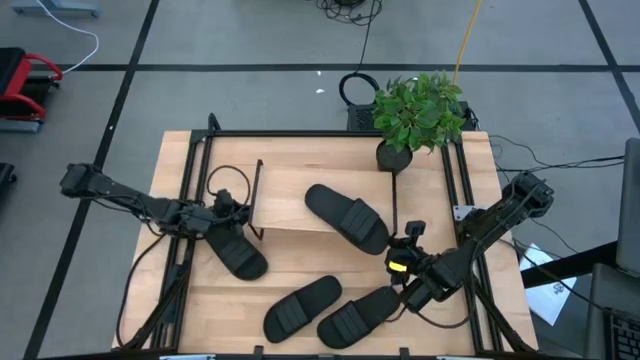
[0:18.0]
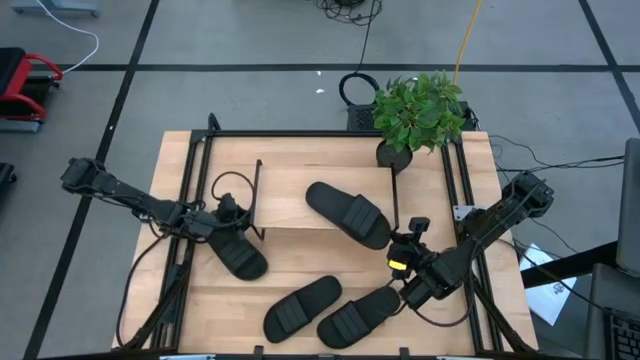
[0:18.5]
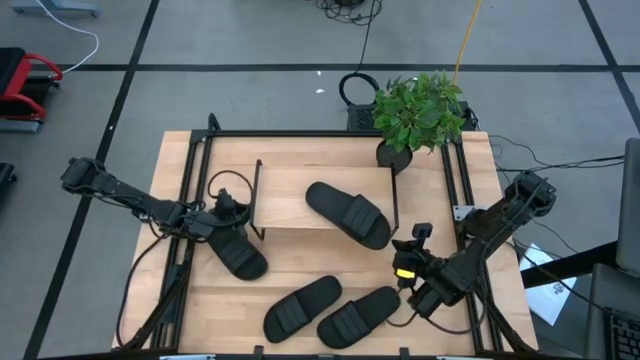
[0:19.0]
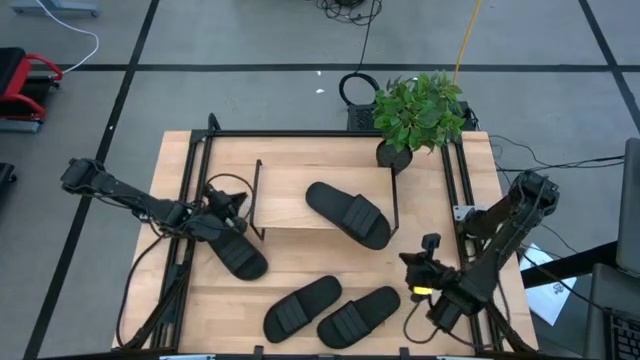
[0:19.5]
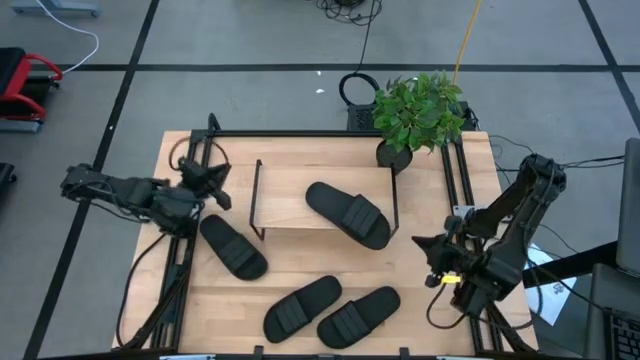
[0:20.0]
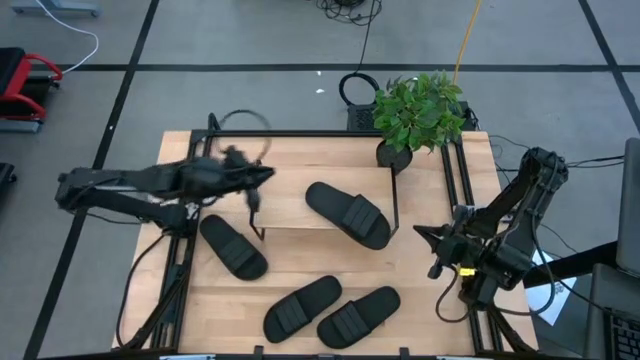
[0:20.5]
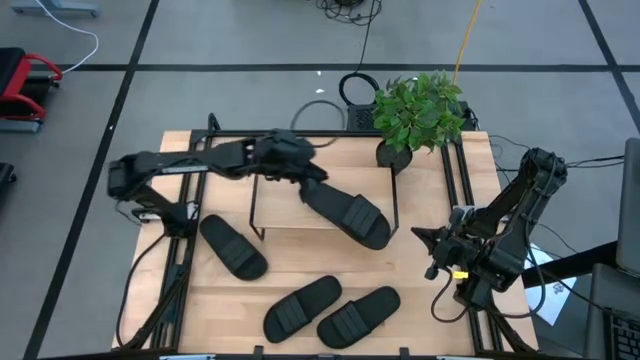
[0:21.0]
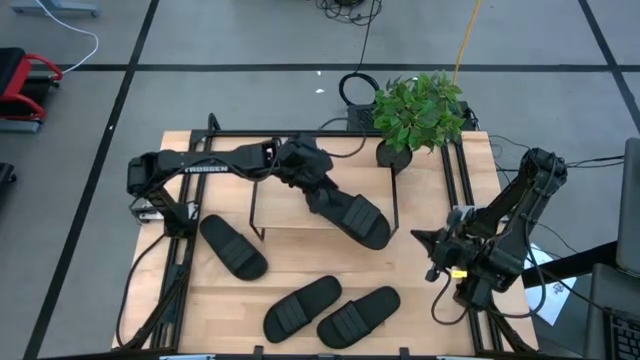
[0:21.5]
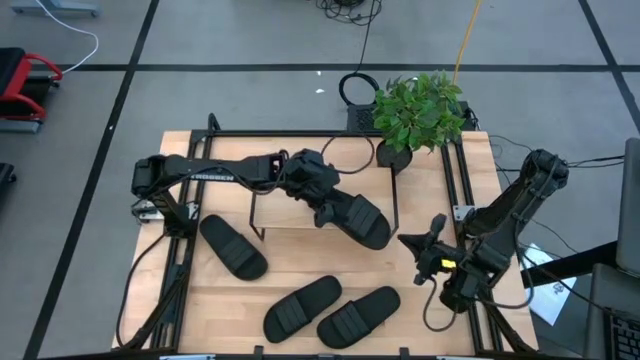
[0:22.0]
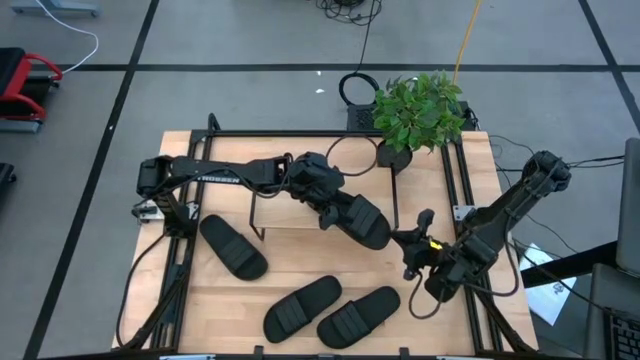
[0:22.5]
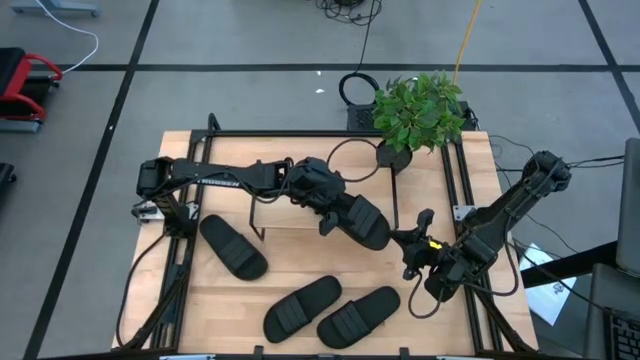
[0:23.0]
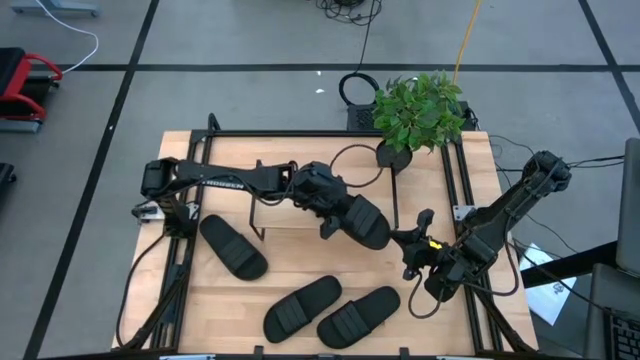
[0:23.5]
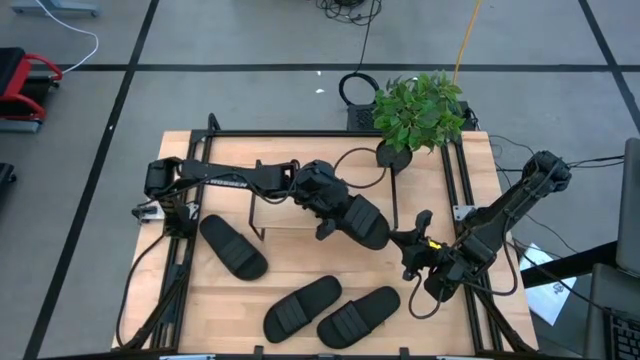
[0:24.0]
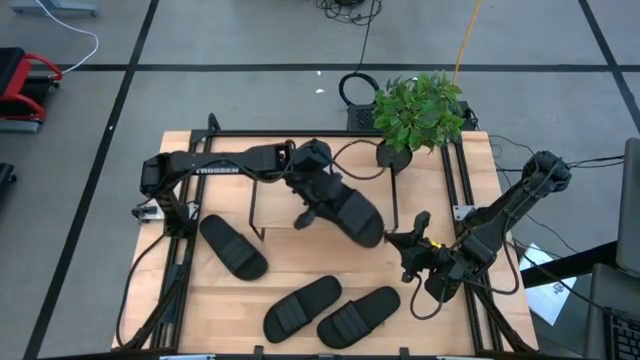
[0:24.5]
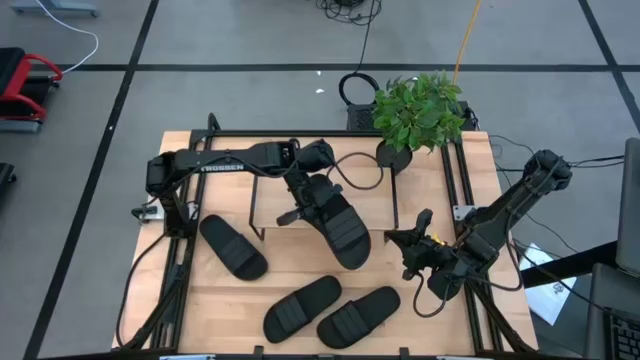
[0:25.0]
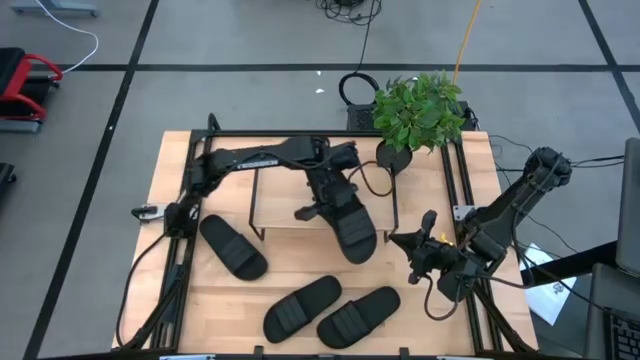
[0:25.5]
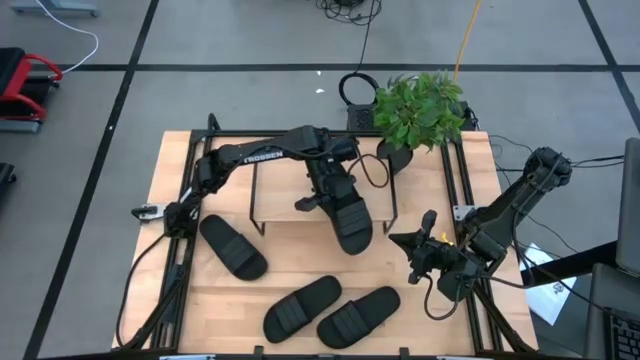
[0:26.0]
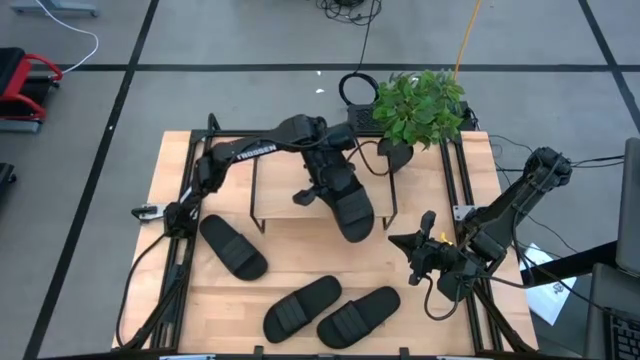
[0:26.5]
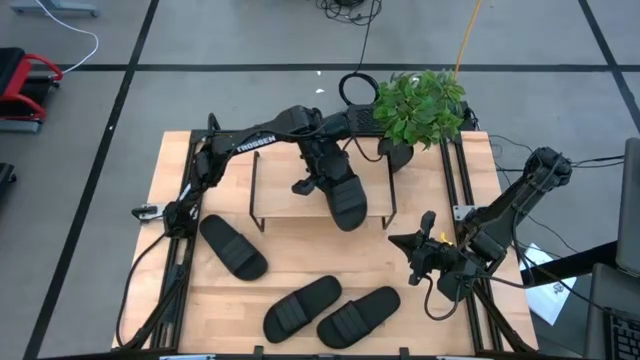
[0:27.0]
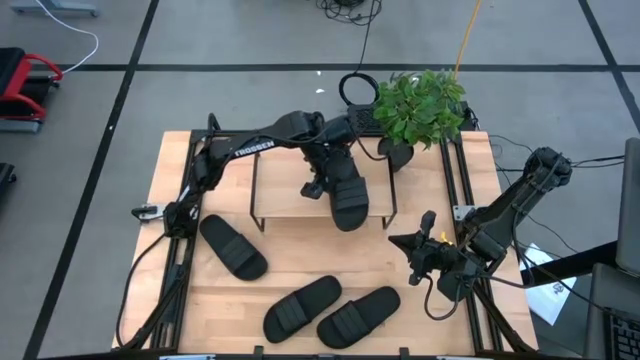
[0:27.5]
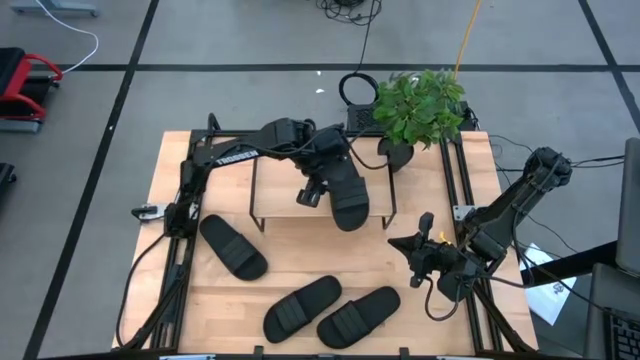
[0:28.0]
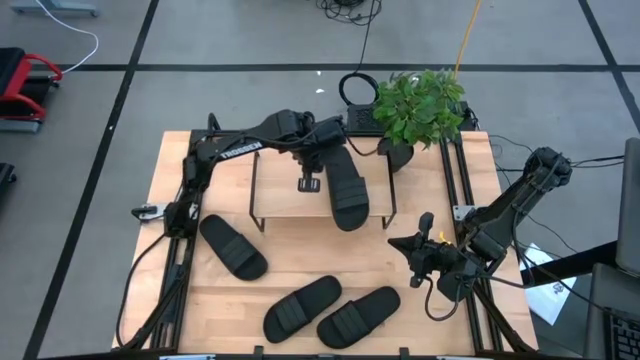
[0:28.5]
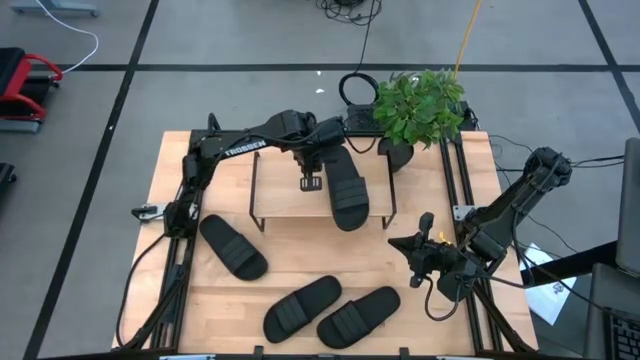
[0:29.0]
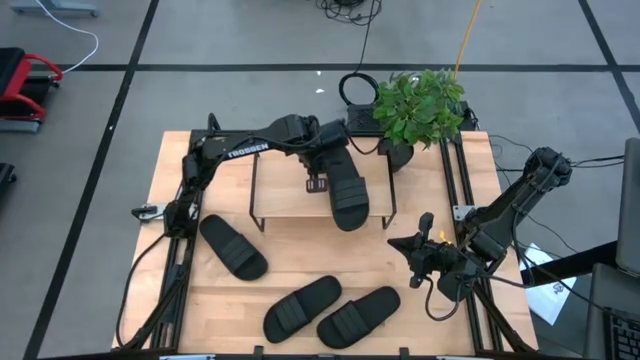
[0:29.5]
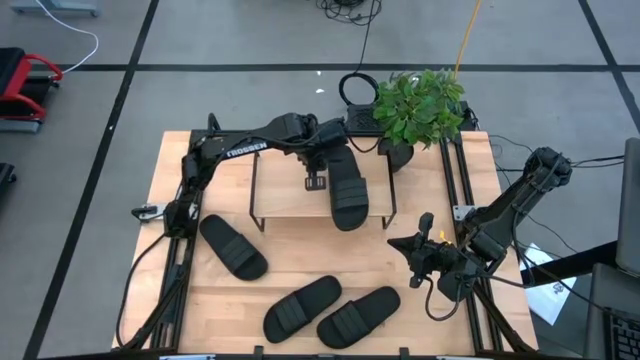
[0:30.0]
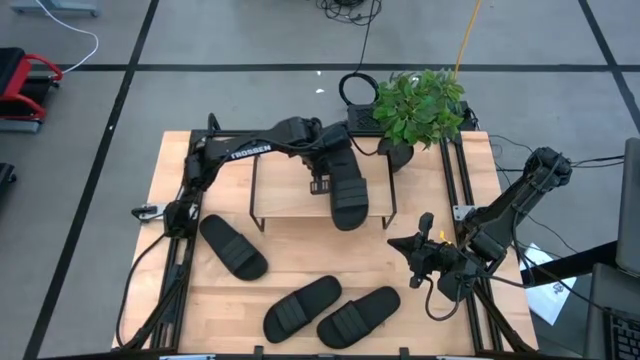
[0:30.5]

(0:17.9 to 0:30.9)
Task: Pick and place slides into the shelf
Put the black slide on the shelf

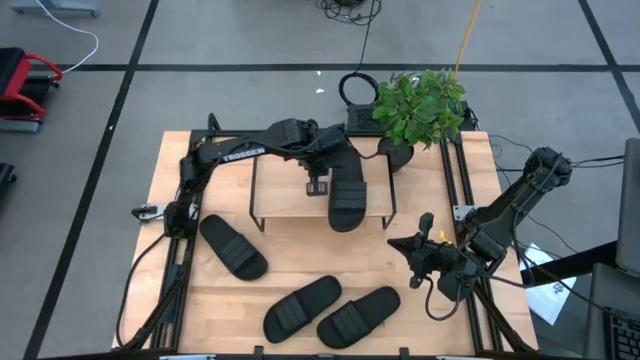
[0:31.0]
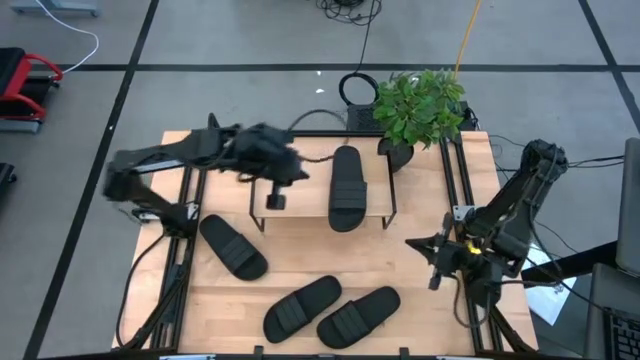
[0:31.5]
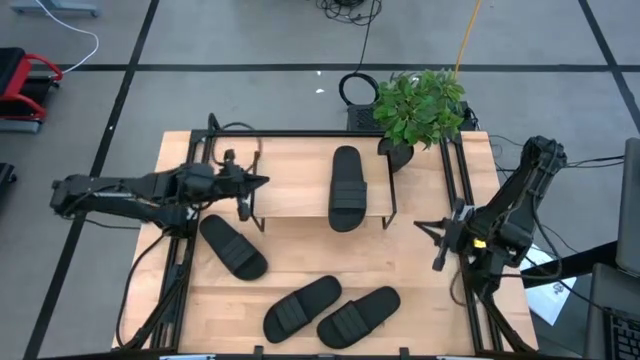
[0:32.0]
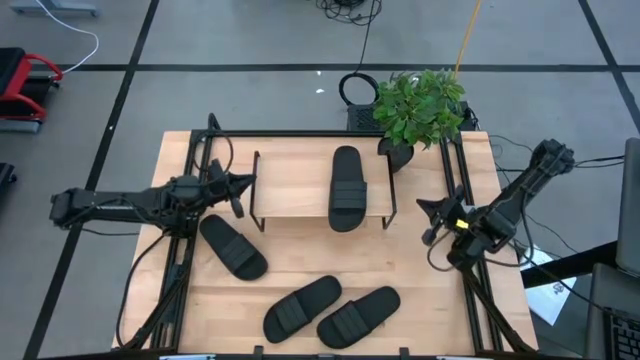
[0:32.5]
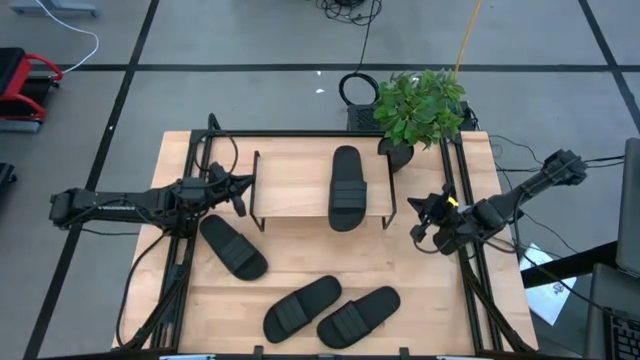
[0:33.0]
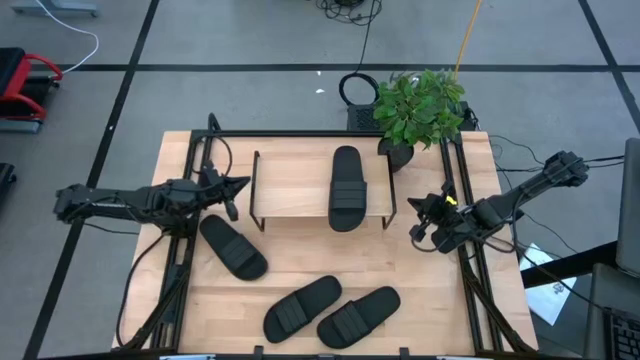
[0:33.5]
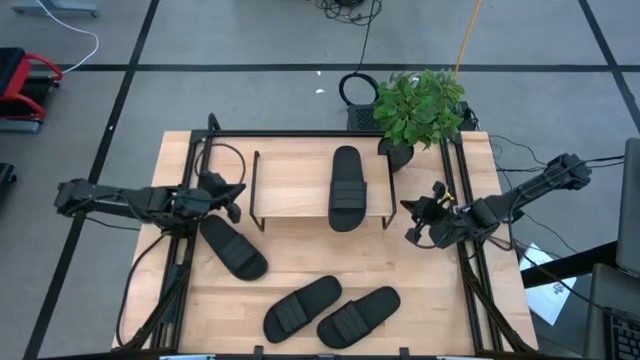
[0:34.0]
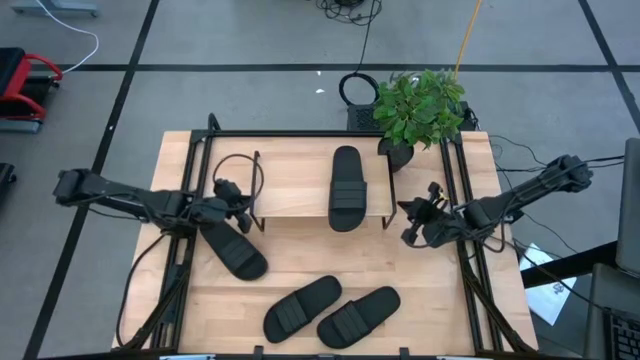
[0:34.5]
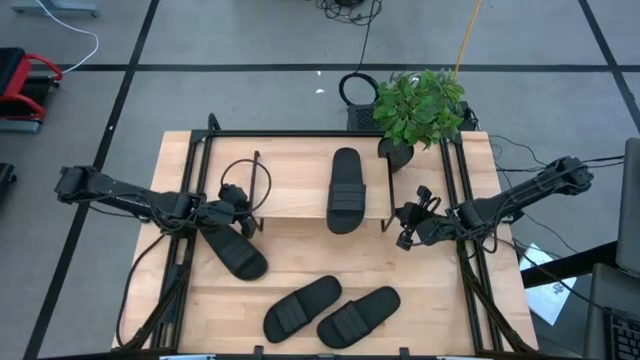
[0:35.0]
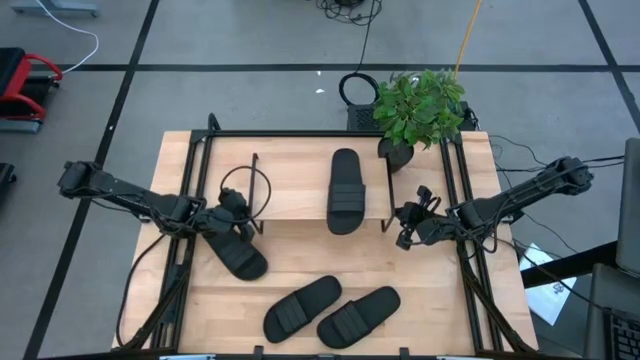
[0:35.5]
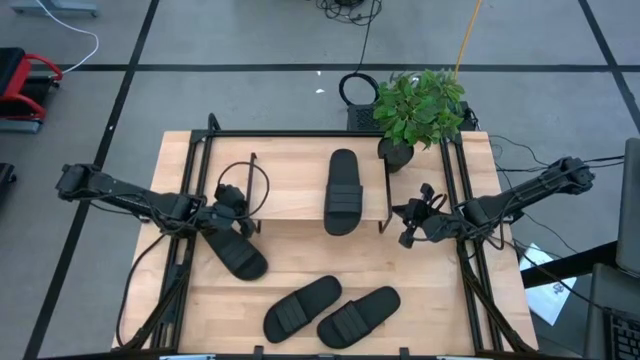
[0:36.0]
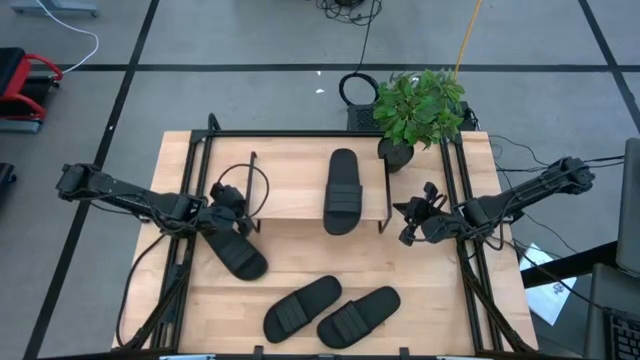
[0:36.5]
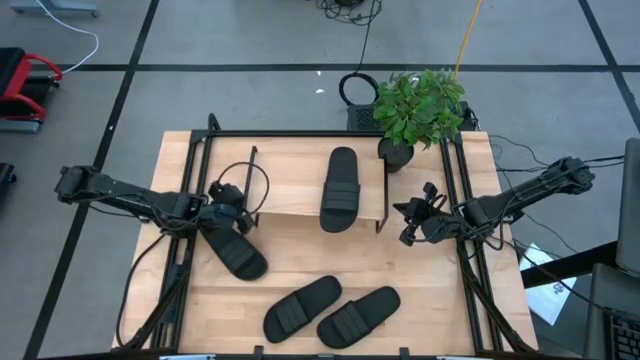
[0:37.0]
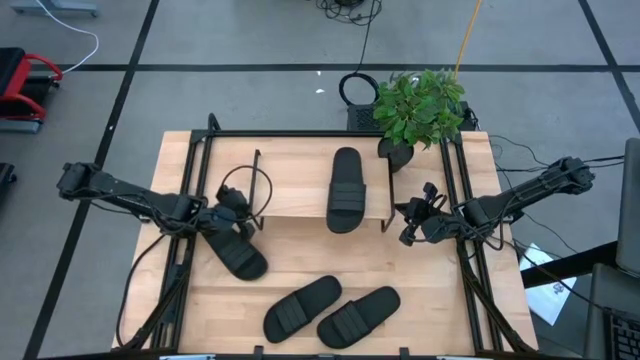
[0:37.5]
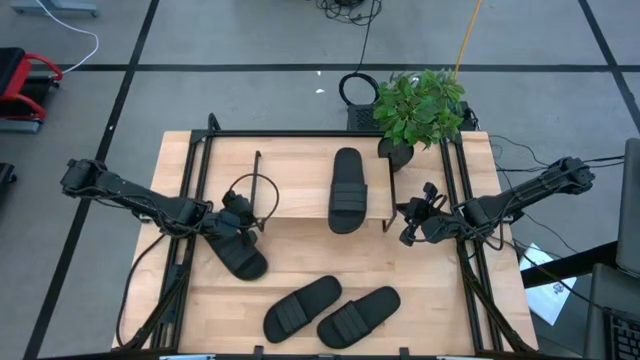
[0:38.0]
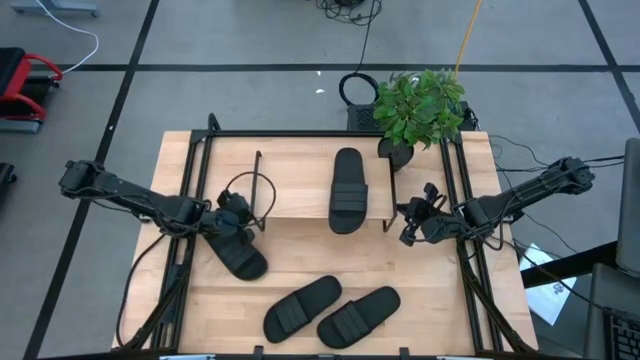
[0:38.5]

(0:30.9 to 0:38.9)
Adjust the shelf
